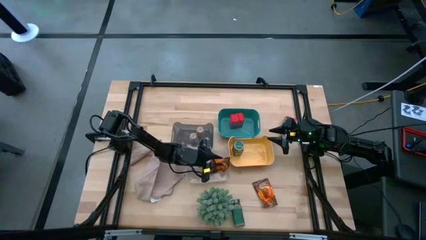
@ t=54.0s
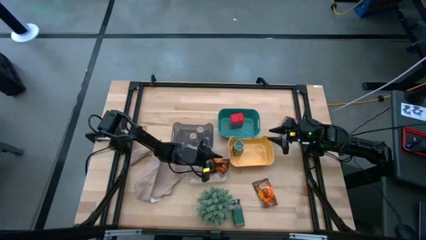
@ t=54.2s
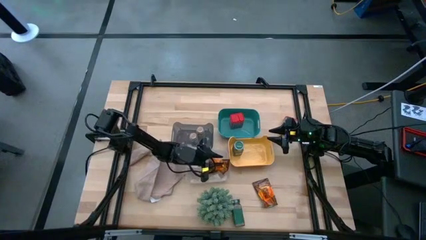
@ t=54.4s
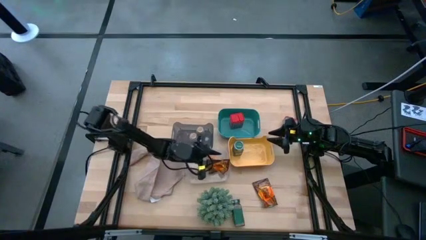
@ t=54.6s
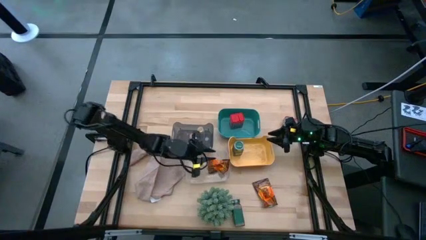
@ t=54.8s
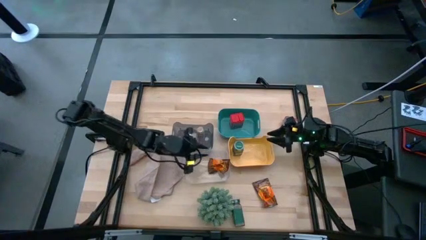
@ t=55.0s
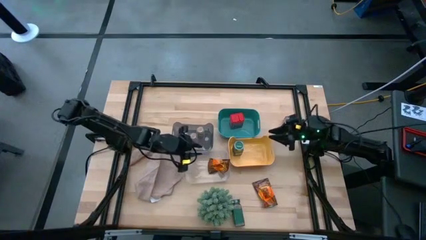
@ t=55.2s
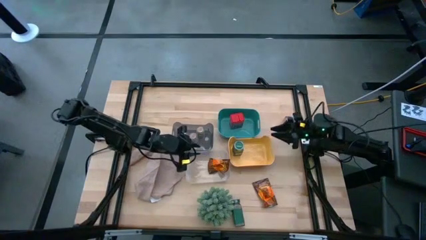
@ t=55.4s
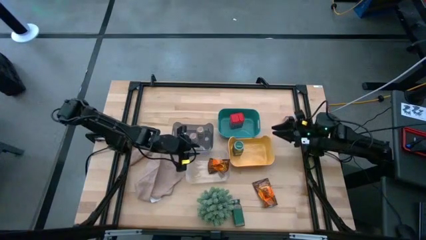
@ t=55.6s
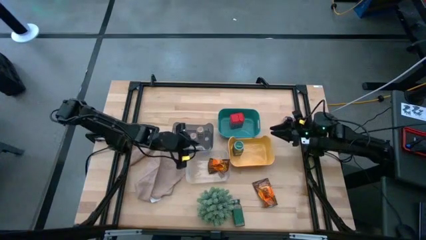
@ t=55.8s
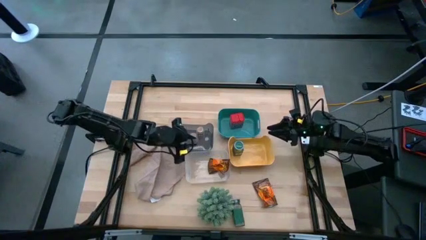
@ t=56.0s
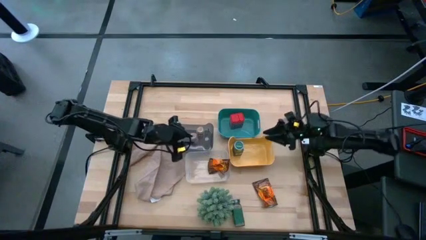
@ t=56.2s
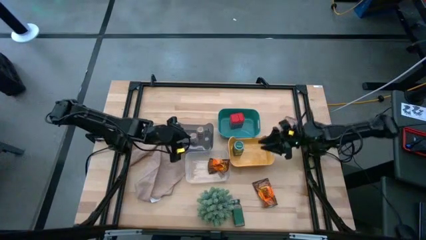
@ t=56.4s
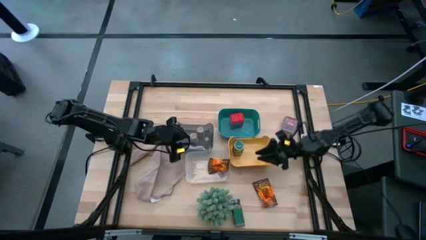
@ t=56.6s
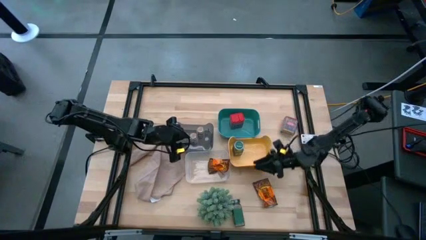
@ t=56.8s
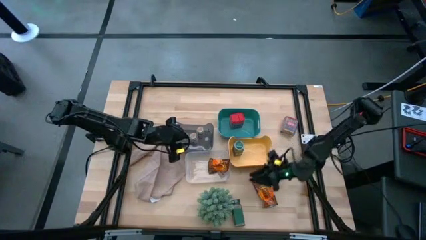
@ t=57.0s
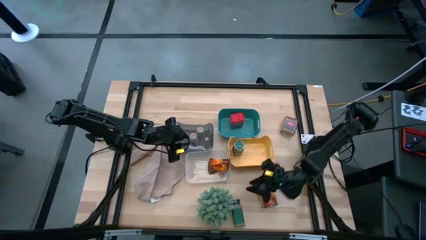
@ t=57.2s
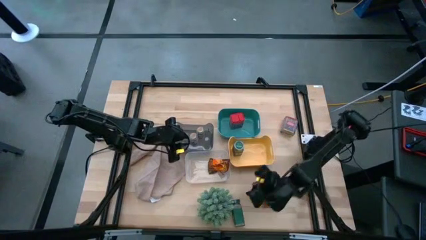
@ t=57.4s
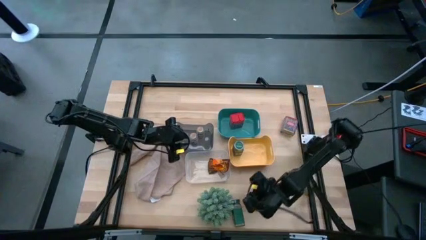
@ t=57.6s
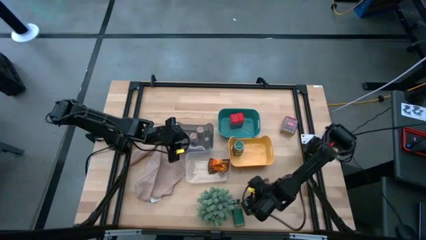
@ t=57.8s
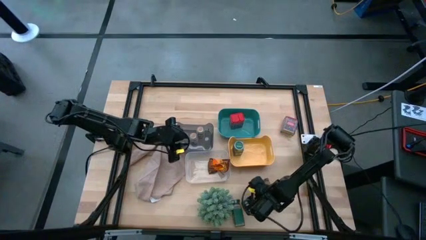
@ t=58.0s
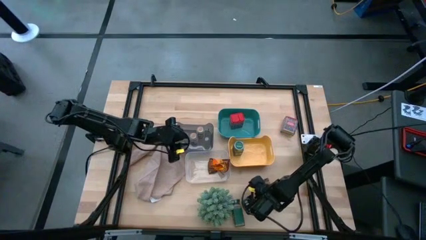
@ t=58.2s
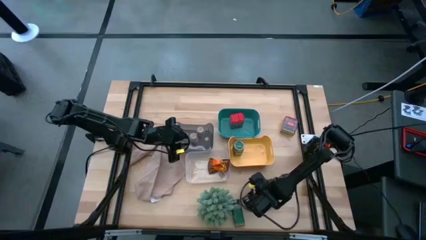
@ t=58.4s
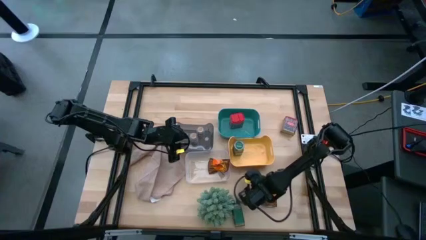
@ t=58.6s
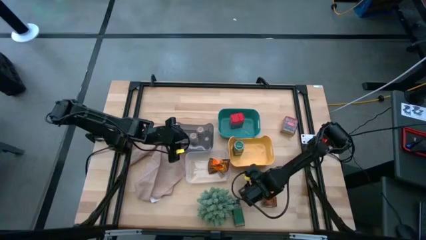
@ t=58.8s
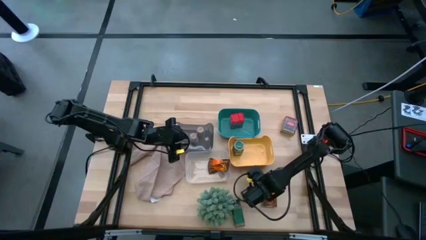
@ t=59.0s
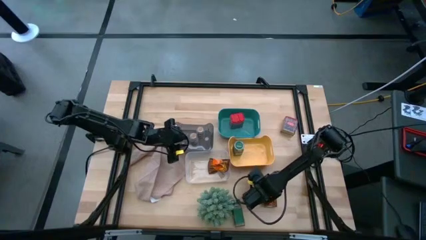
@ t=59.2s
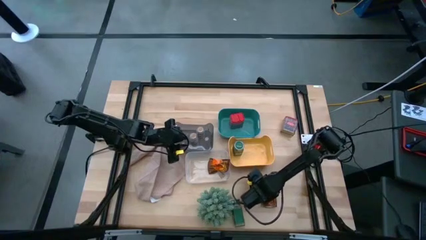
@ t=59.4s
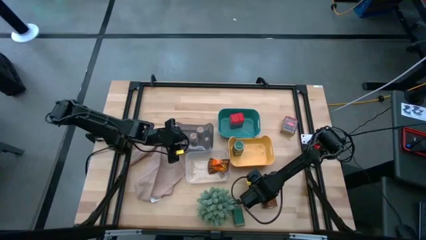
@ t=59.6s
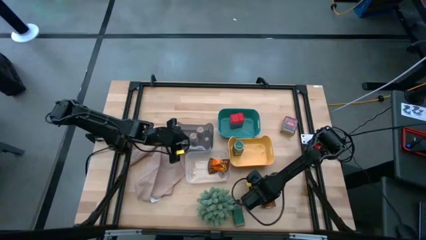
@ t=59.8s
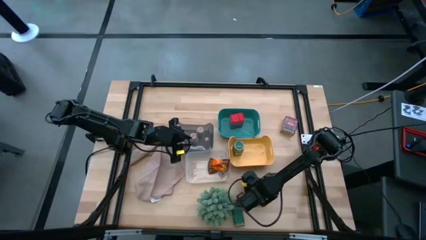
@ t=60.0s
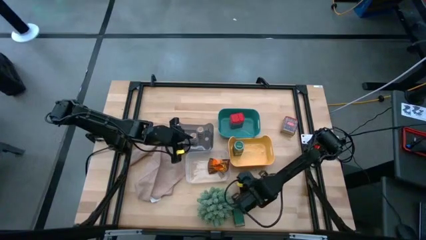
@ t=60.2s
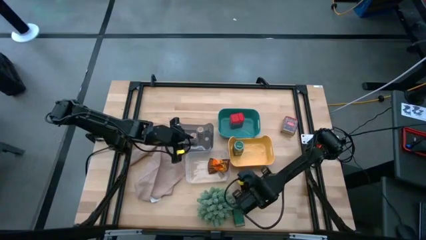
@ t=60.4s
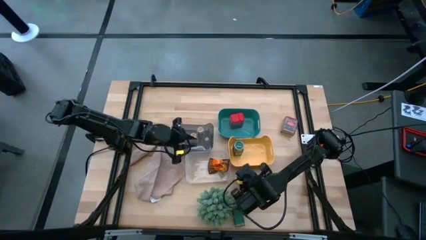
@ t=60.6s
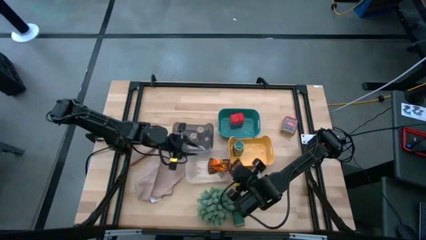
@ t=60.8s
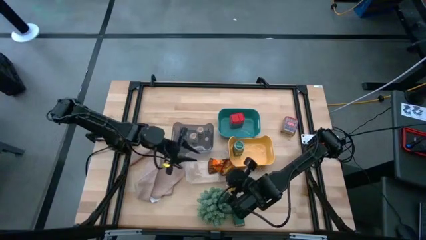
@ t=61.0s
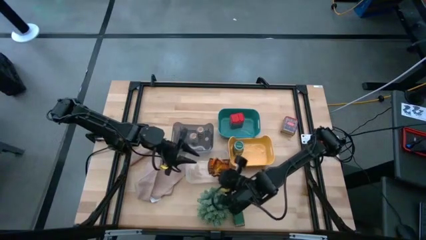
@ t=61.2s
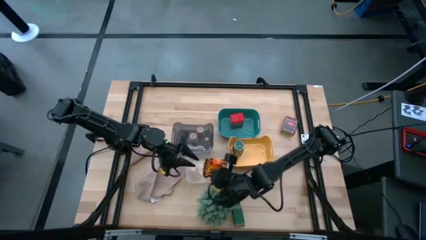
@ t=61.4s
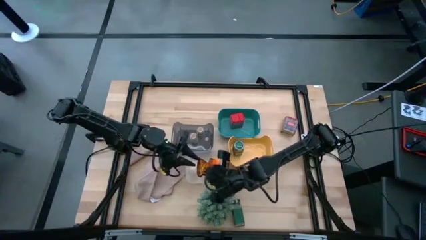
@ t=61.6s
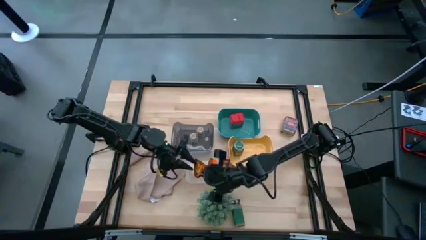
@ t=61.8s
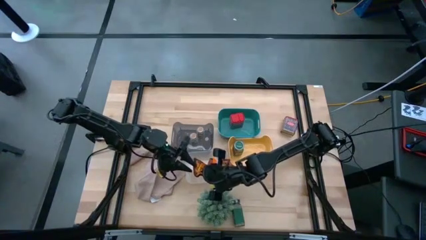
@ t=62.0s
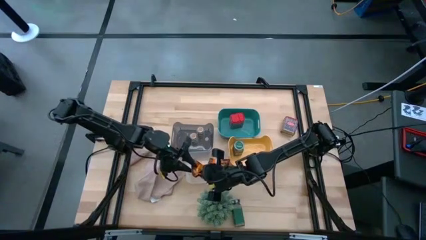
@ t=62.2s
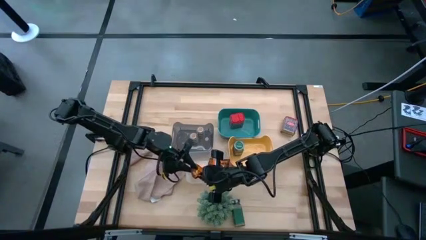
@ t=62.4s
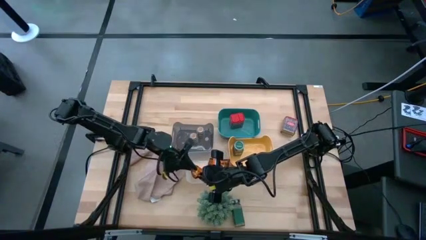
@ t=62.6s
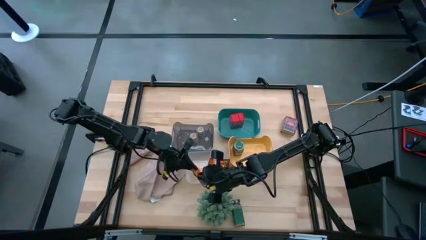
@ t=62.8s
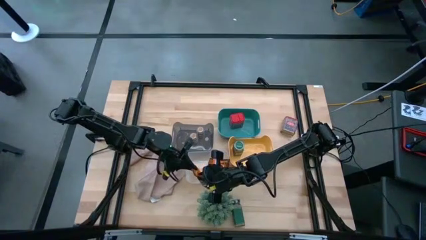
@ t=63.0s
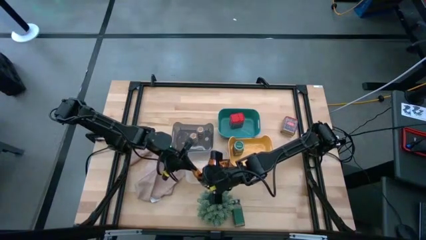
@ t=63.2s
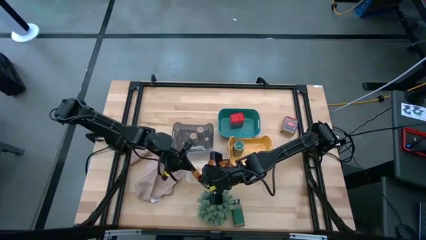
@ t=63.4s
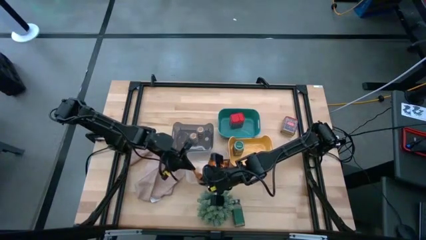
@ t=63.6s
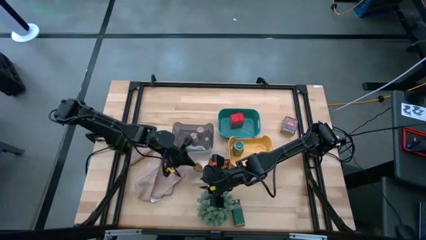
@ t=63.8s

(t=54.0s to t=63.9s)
Task: Sort spices by type
Put the orange seasoning pack into the transparent bin

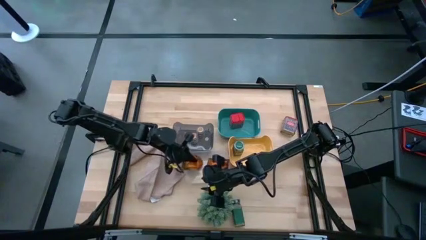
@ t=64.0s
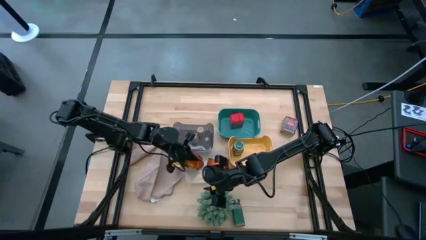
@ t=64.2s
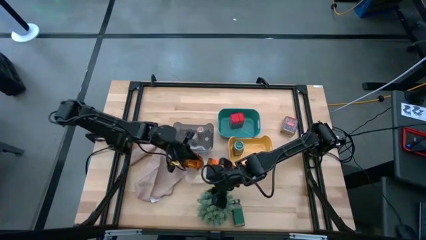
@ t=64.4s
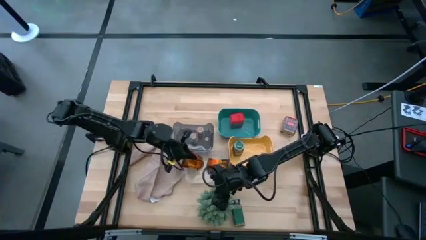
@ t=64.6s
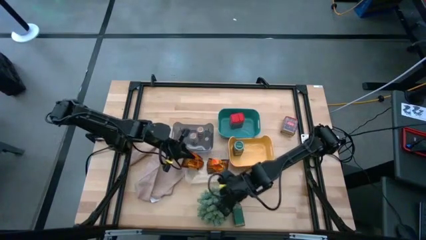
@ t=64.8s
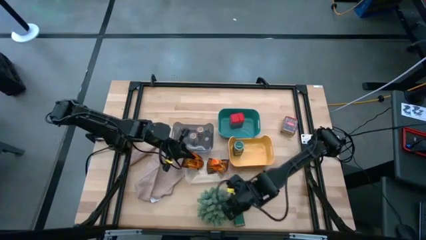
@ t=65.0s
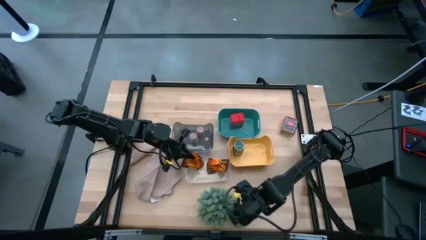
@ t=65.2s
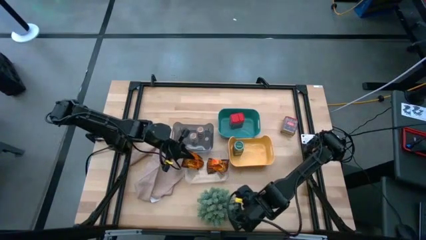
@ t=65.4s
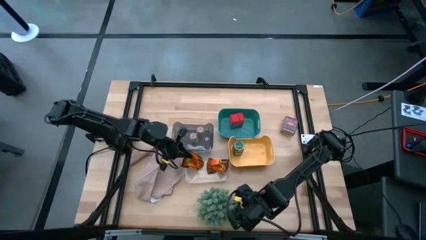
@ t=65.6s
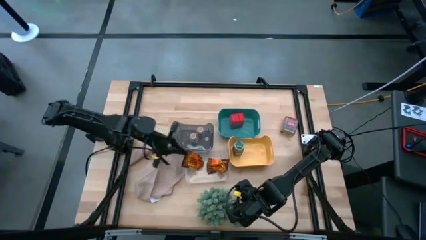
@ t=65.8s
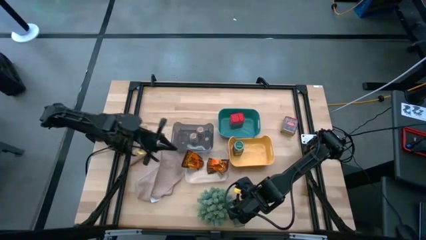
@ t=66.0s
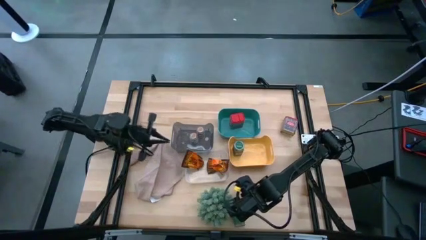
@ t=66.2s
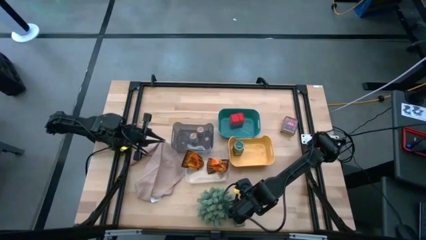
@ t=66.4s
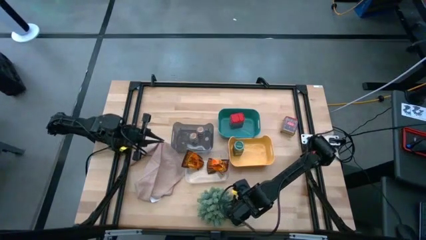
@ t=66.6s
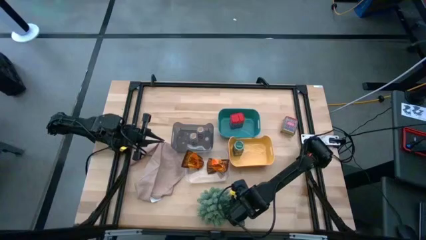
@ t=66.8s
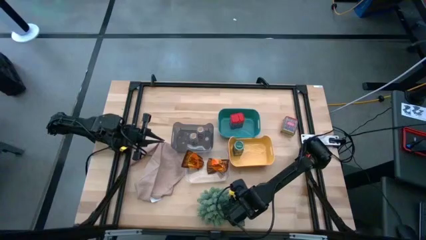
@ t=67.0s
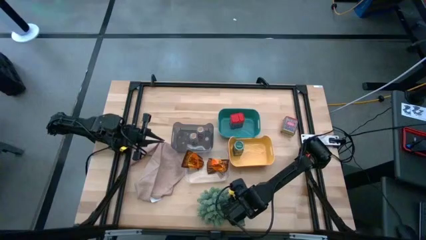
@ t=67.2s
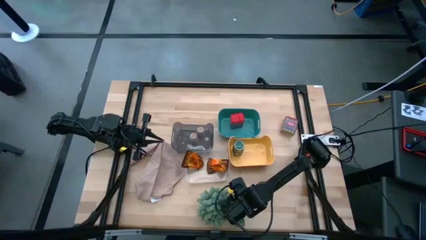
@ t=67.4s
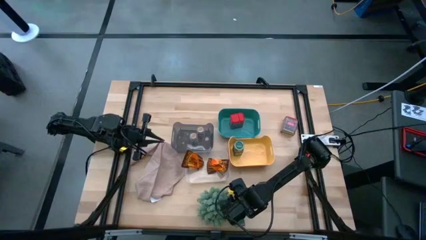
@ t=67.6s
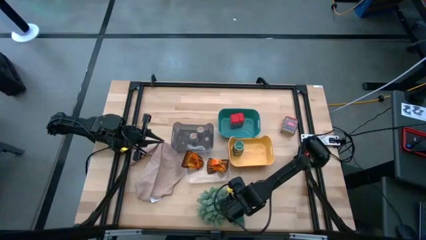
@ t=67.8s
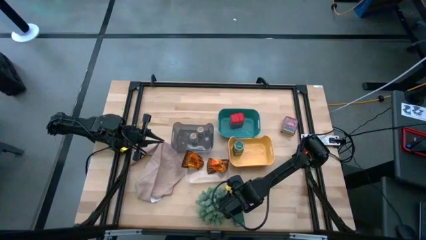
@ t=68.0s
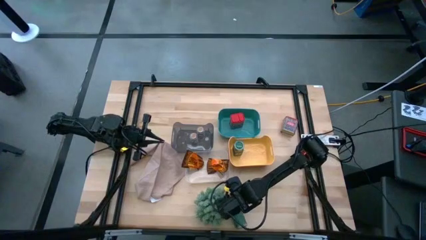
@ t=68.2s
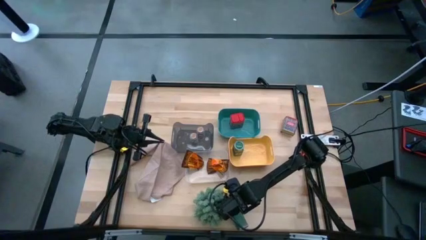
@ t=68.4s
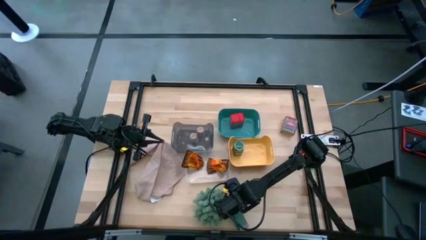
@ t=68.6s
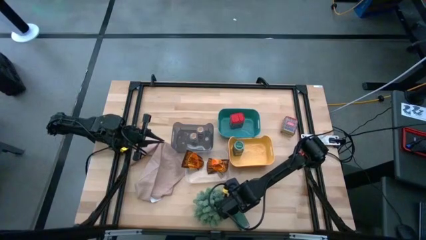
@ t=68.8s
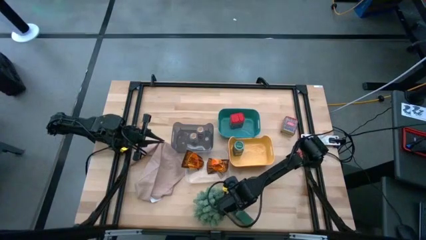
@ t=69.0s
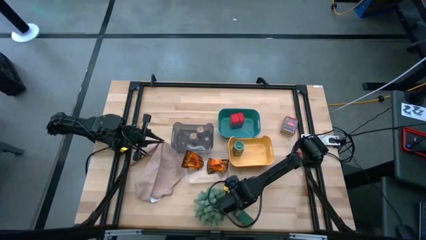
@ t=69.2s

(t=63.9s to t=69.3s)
Put the green seasoning bottle into the yellow bin
